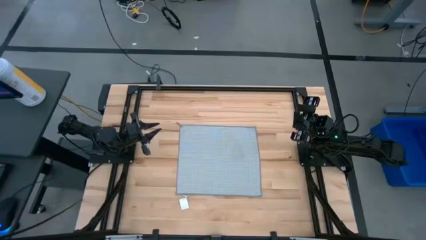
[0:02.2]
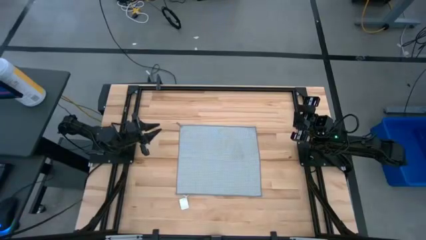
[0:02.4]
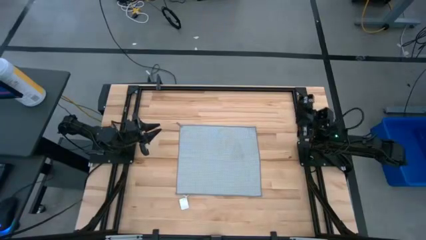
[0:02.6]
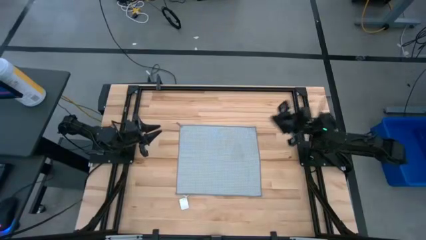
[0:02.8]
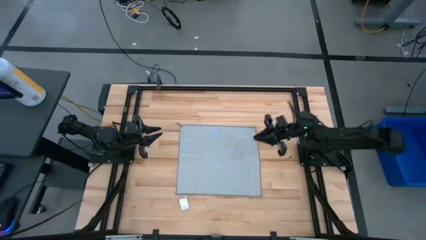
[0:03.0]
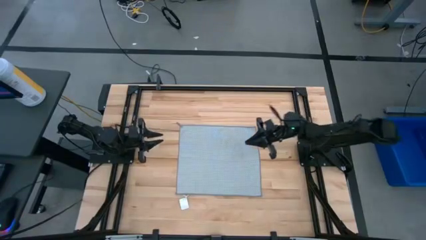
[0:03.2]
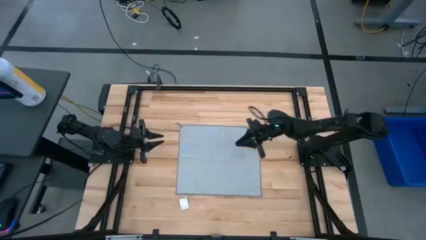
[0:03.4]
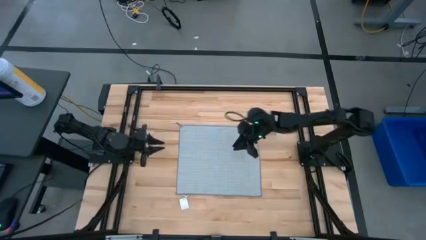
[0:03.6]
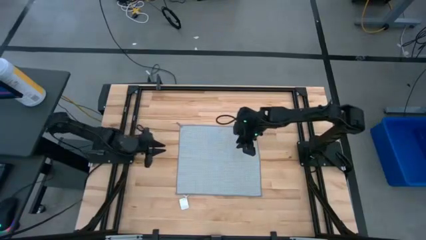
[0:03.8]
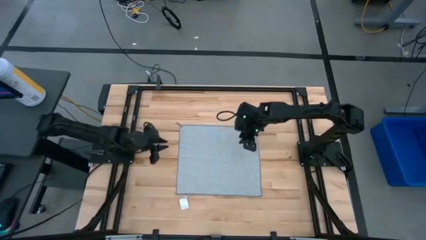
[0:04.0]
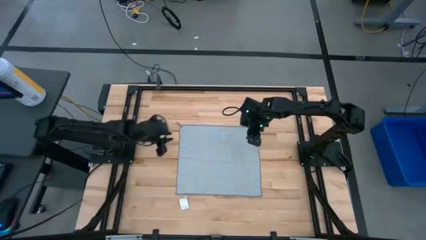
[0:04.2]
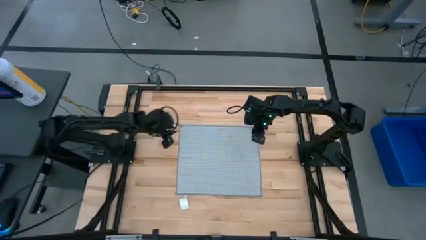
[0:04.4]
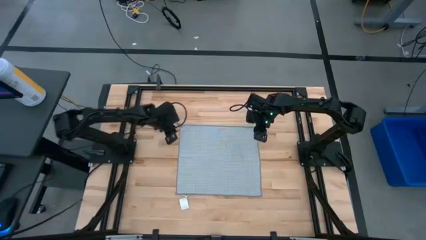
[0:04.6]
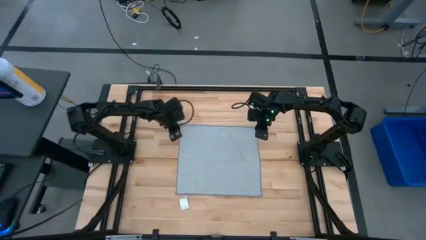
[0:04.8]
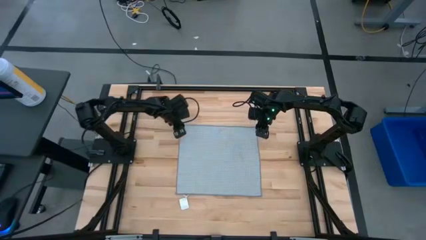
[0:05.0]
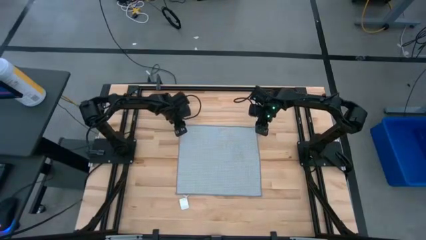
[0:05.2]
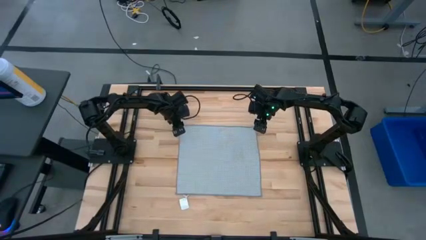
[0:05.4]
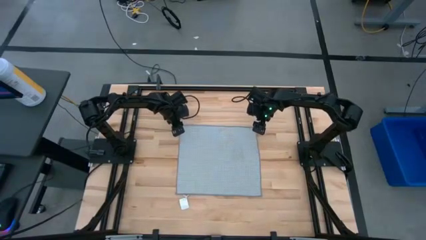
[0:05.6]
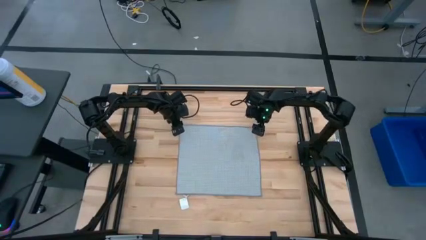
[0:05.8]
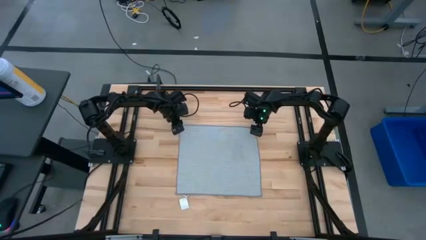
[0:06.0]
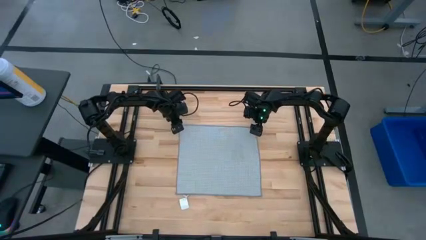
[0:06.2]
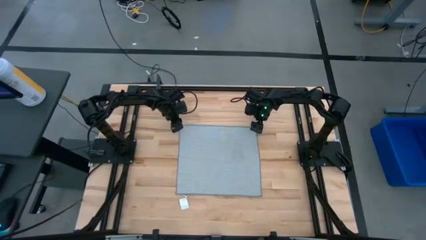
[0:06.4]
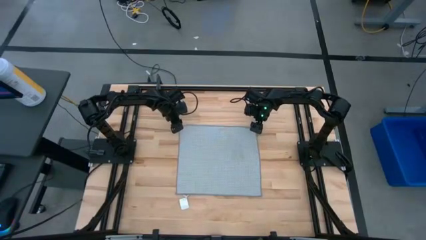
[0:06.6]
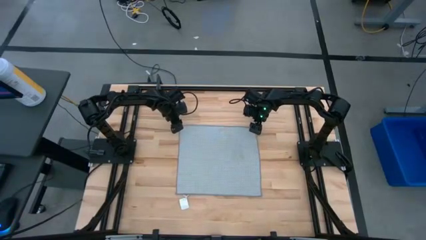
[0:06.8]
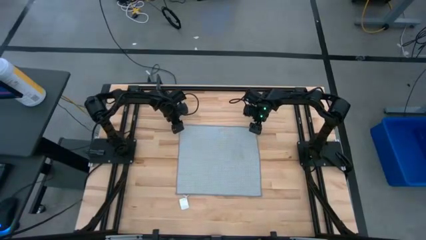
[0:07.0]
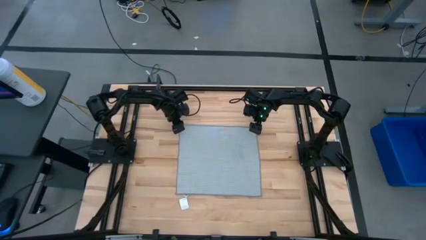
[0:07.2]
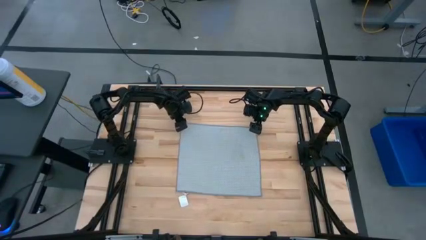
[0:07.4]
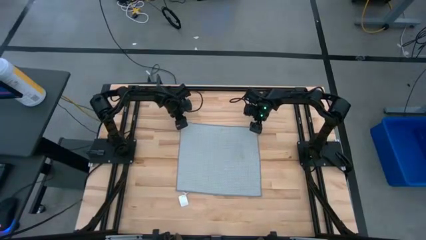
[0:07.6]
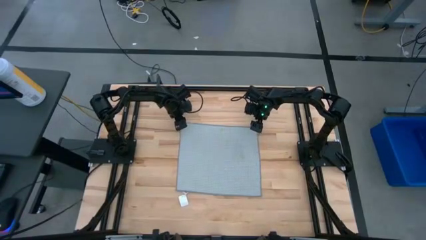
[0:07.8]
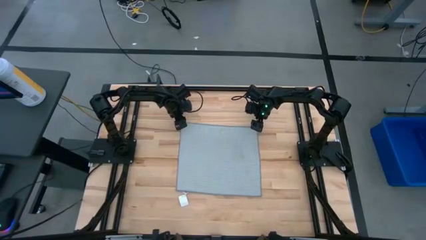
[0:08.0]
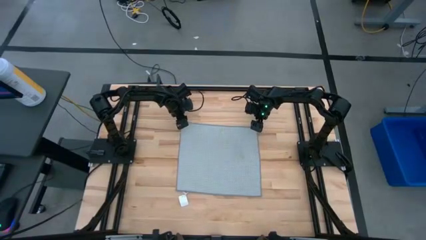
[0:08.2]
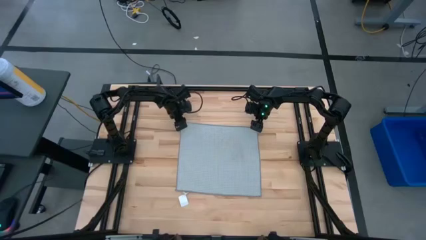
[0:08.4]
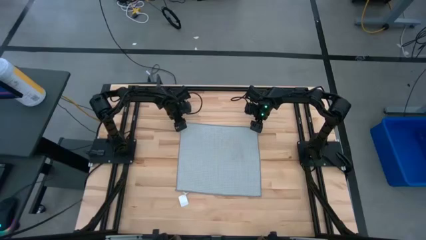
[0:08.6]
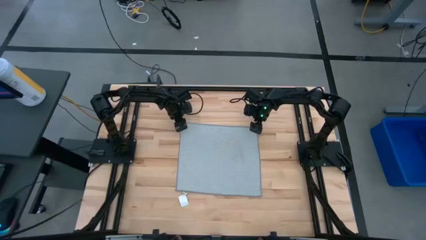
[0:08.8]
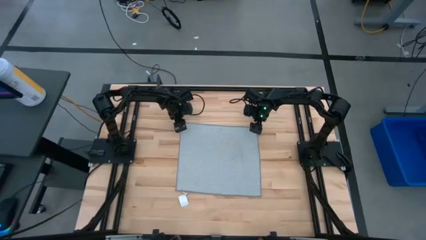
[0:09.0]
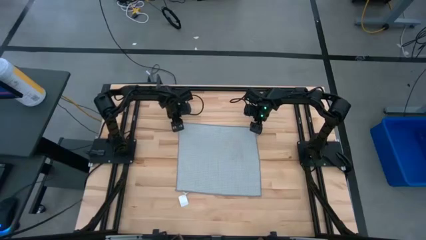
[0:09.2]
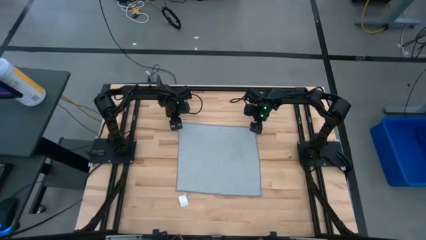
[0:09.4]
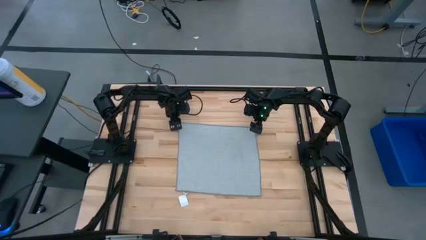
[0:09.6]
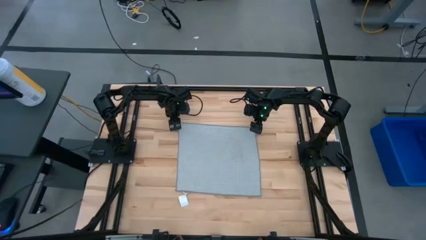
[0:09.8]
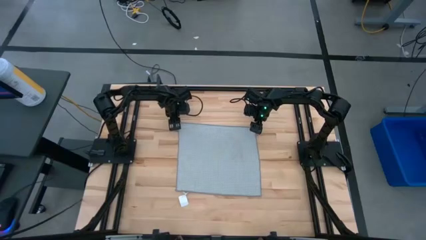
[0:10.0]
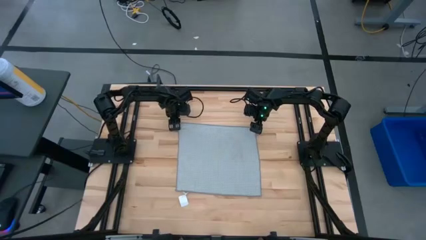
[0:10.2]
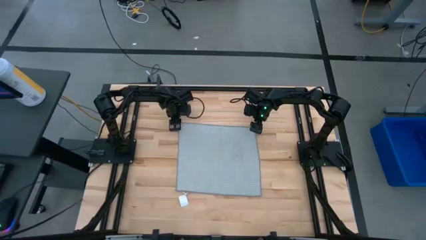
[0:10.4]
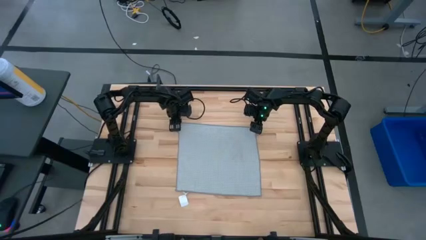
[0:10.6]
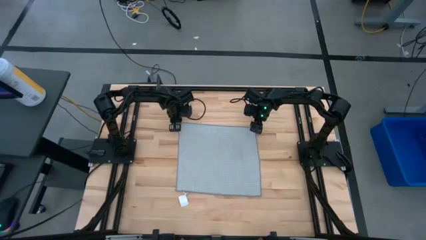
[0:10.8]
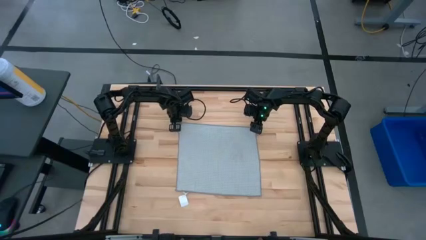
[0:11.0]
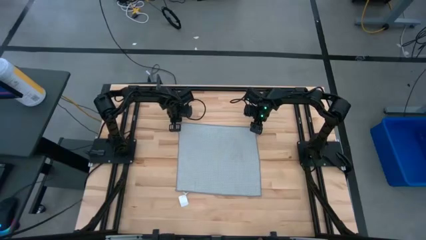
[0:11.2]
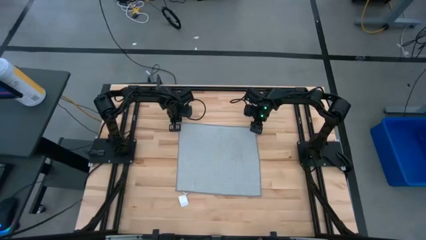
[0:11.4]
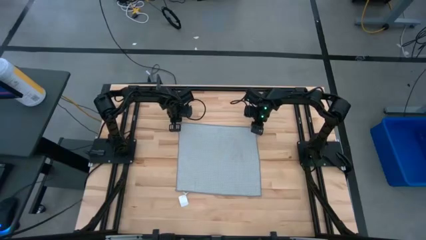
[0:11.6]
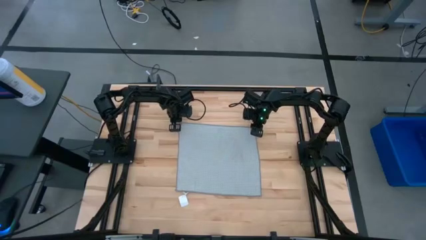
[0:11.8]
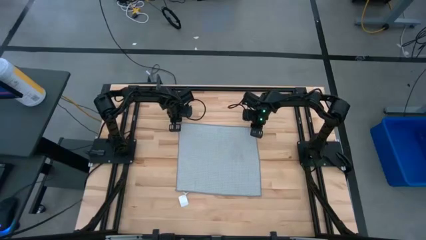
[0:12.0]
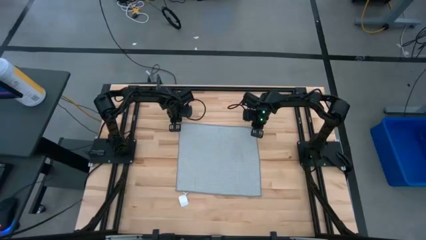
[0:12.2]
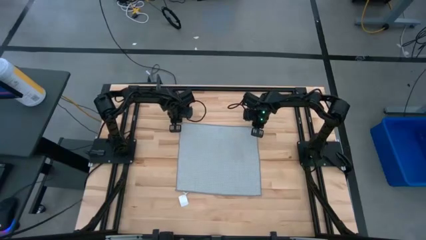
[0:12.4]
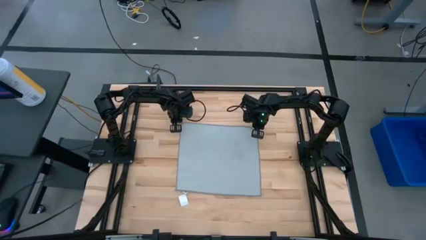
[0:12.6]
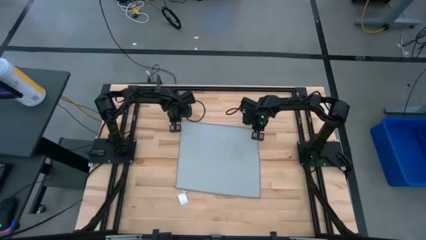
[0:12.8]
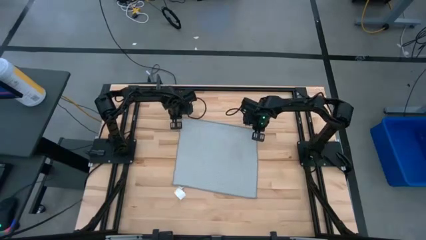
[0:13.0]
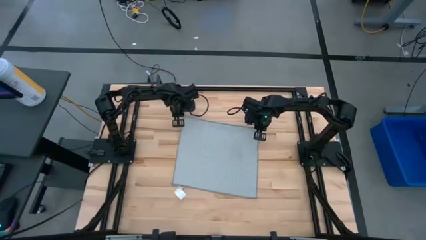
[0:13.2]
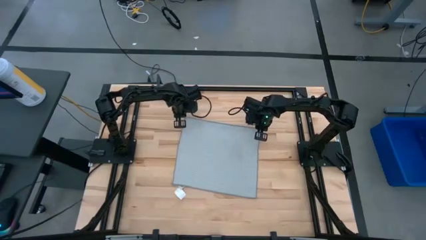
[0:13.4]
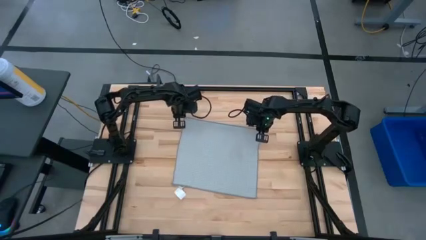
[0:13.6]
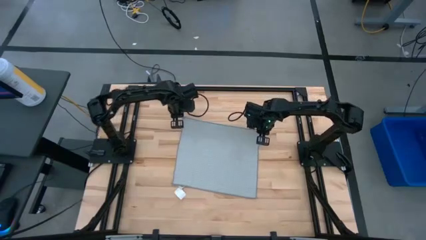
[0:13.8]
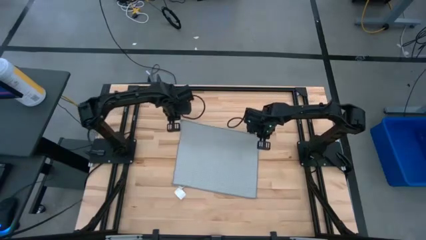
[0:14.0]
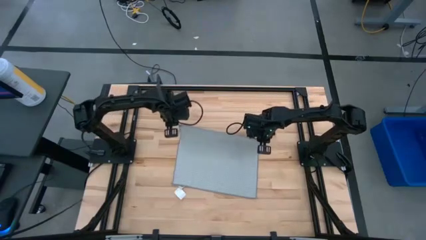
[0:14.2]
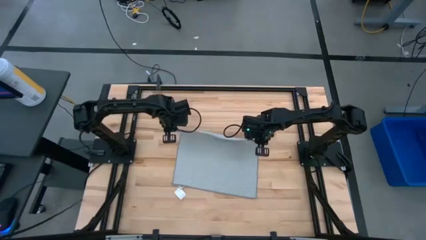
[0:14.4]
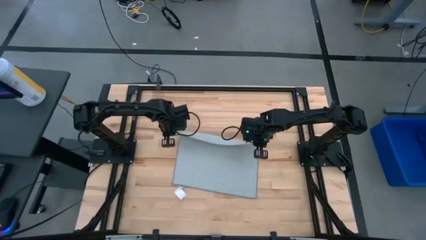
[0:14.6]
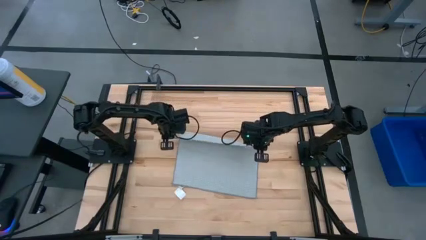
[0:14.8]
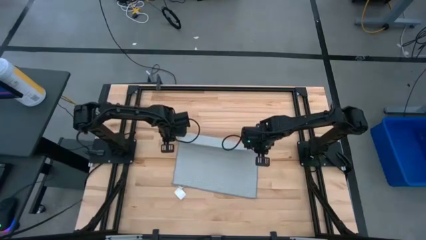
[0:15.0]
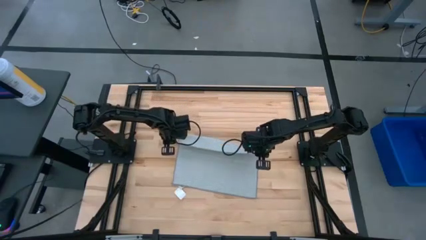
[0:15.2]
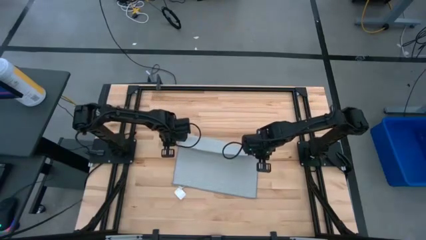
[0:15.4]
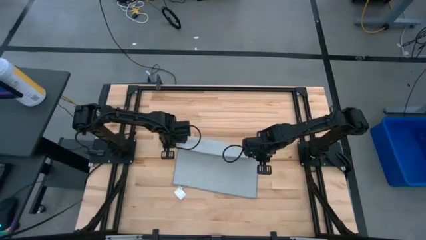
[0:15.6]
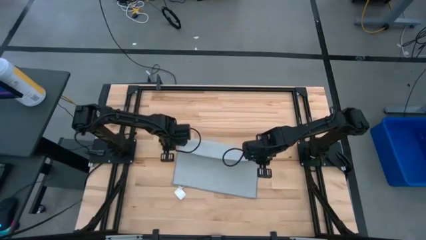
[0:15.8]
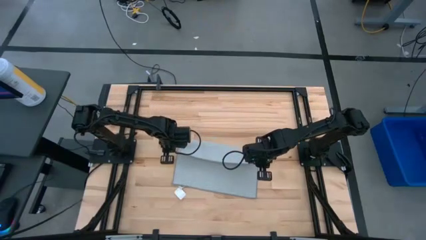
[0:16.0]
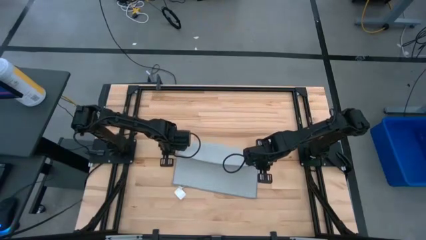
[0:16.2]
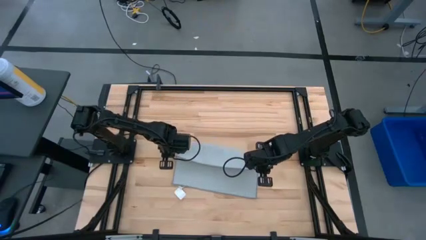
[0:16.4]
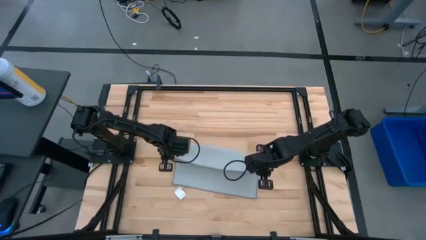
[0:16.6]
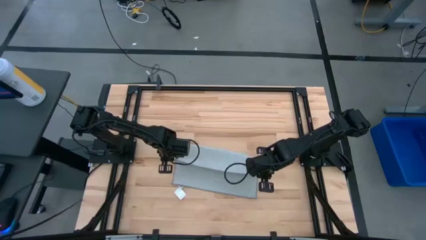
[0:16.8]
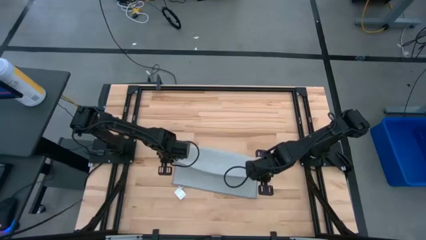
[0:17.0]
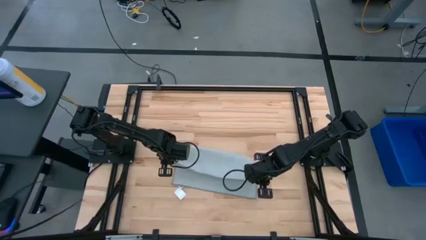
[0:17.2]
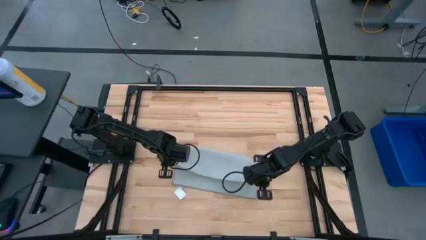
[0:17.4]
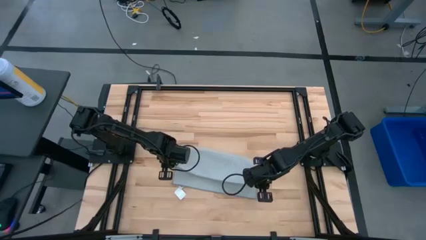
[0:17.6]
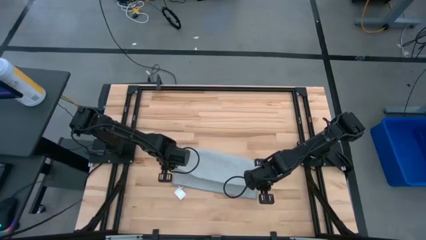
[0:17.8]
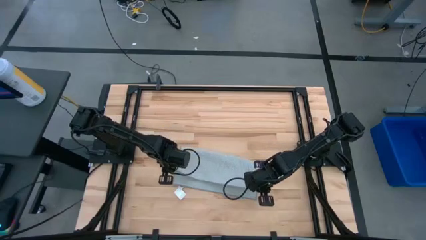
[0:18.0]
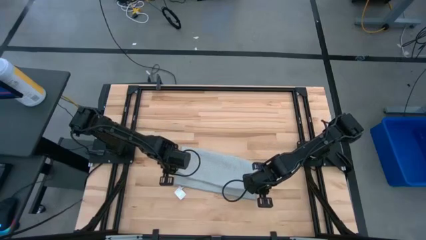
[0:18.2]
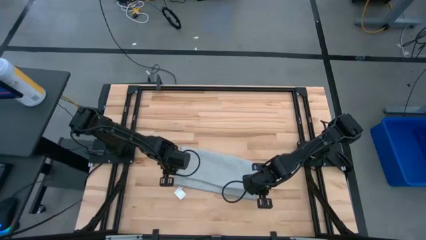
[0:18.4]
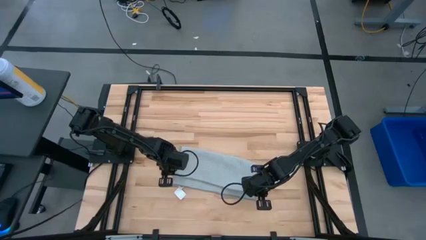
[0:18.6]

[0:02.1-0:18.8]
Task: Fold microfiber towels
Fold the gray towel
